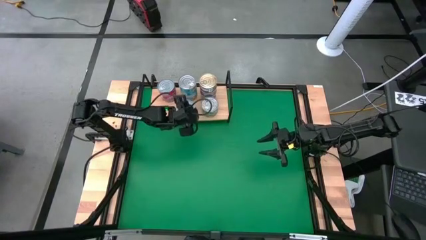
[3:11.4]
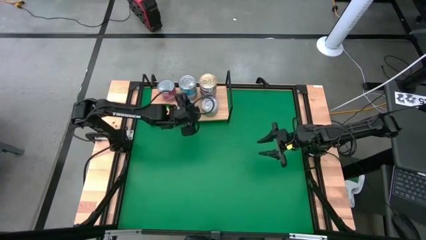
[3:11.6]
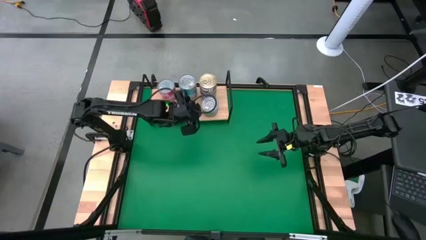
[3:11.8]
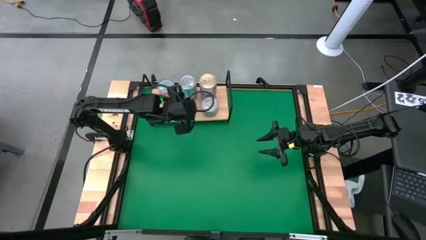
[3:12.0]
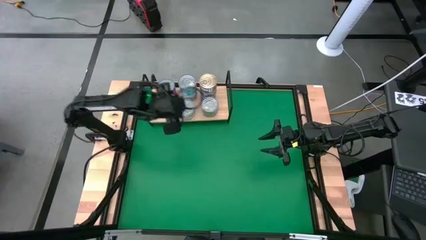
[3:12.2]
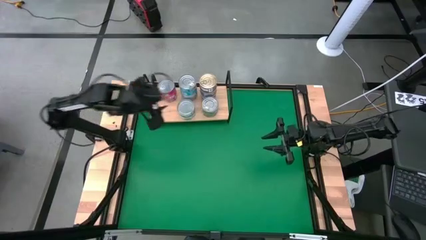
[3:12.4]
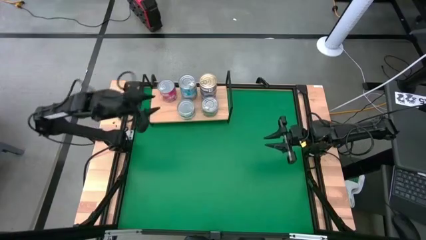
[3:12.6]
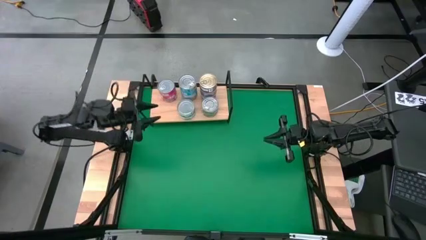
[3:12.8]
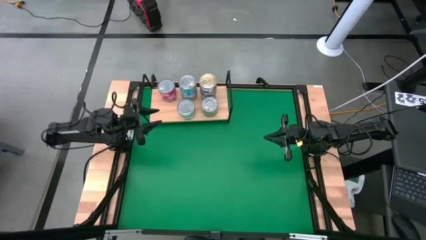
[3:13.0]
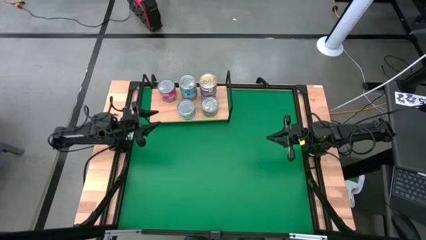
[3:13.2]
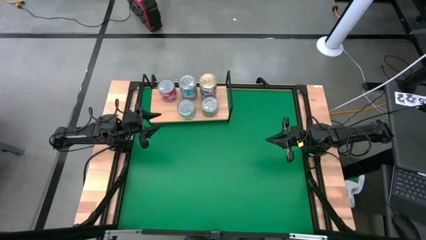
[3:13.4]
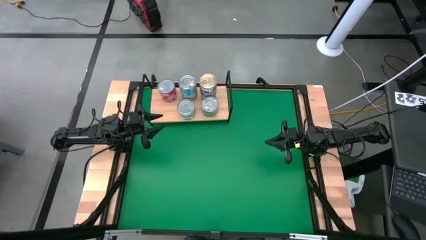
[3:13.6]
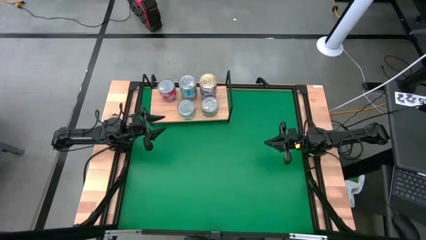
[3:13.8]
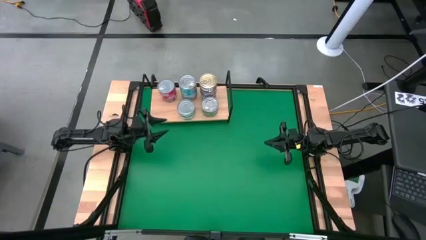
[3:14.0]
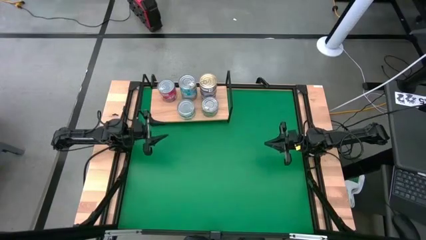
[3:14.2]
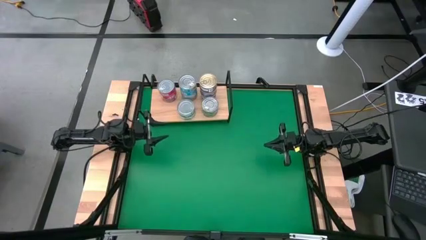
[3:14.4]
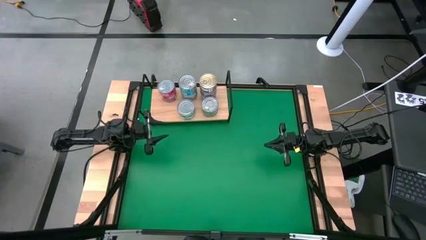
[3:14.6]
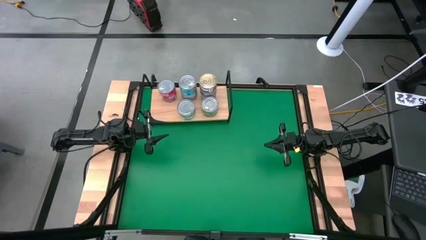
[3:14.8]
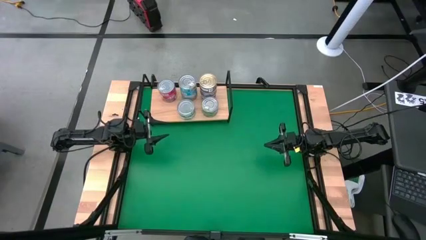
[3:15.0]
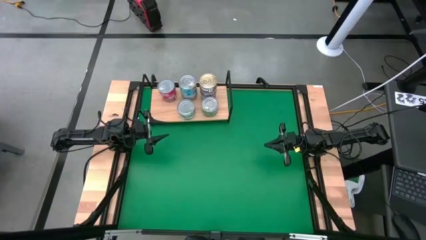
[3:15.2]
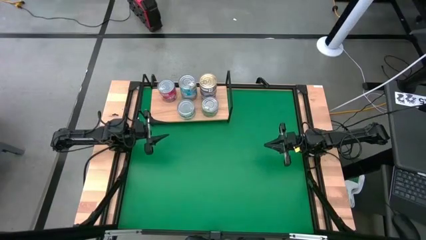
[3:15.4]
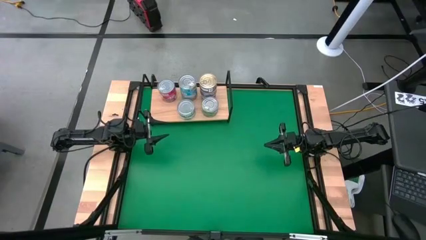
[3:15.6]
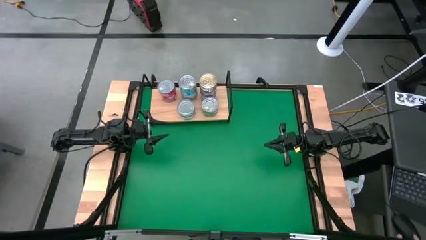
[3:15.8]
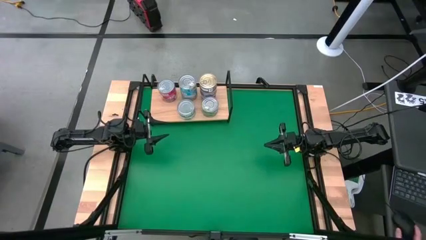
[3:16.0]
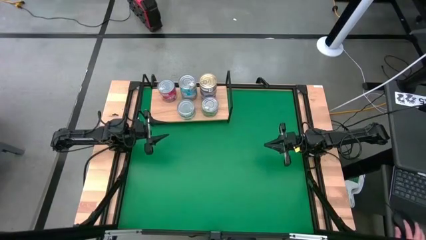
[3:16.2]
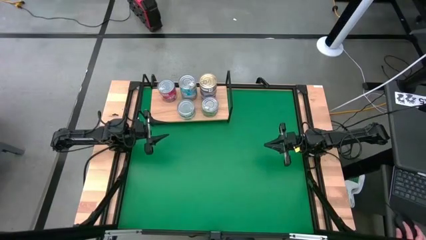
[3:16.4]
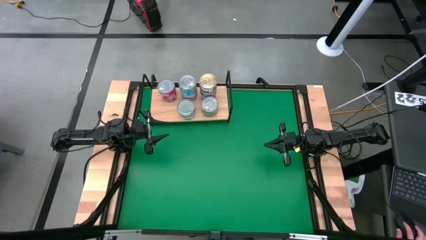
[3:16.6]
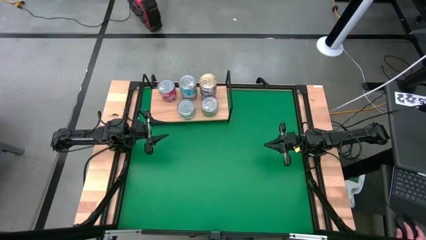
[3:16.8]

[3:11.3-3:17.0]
Task: Stack canned seafood by type on shelf
Return to Home Position

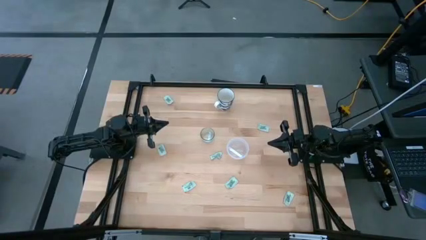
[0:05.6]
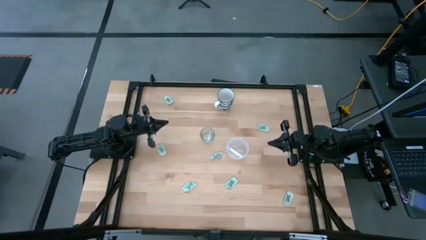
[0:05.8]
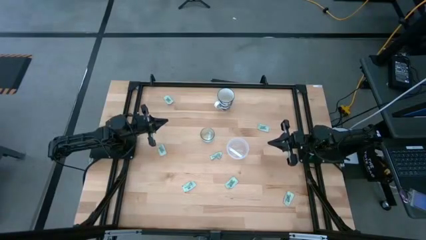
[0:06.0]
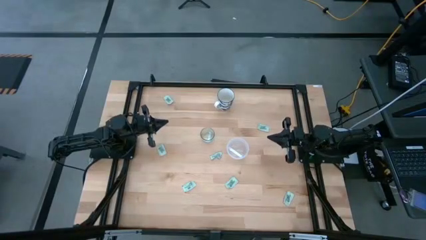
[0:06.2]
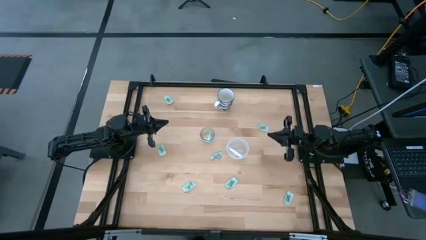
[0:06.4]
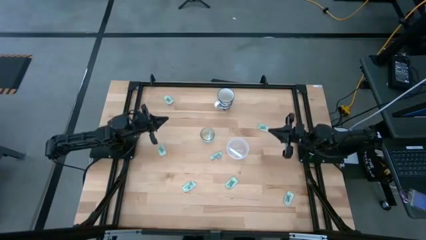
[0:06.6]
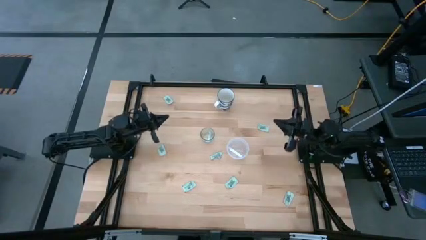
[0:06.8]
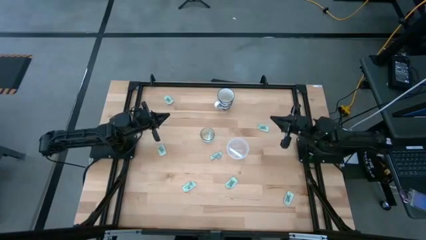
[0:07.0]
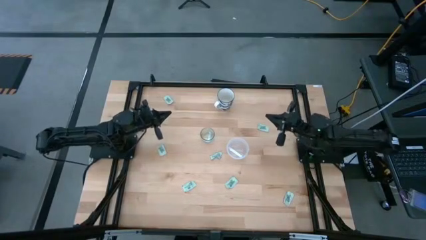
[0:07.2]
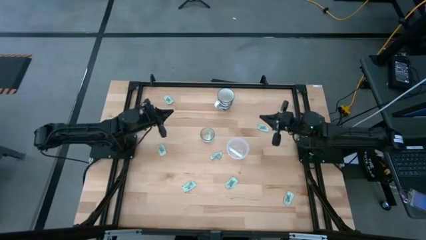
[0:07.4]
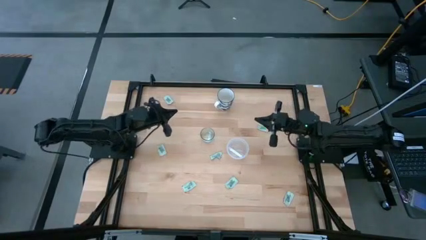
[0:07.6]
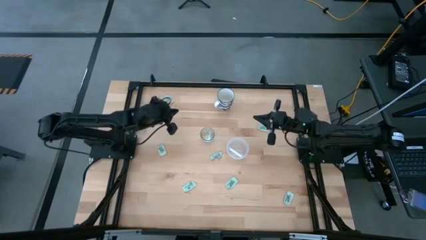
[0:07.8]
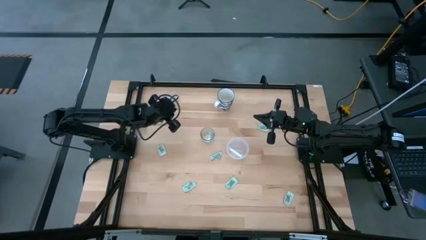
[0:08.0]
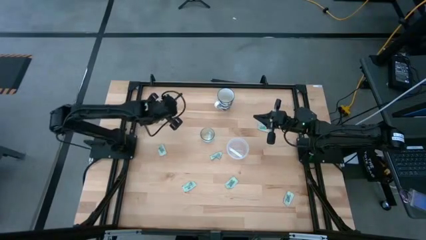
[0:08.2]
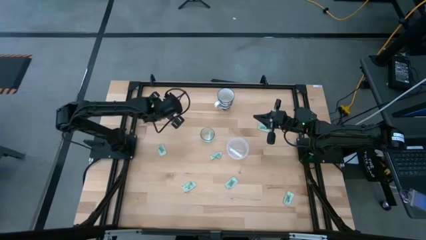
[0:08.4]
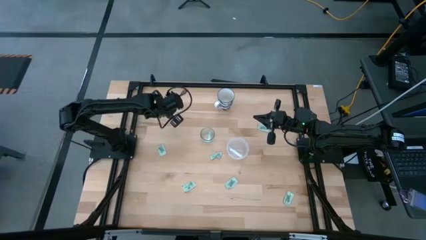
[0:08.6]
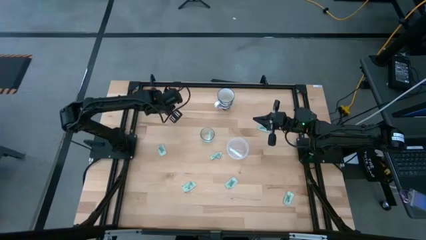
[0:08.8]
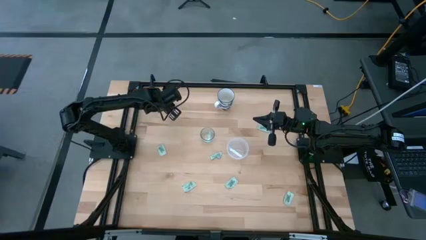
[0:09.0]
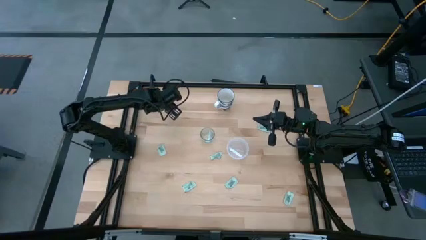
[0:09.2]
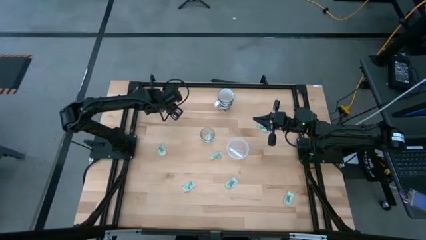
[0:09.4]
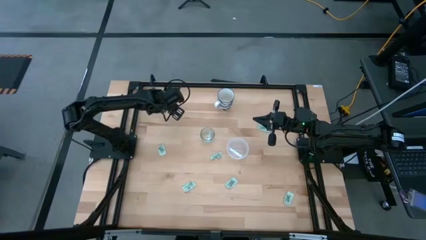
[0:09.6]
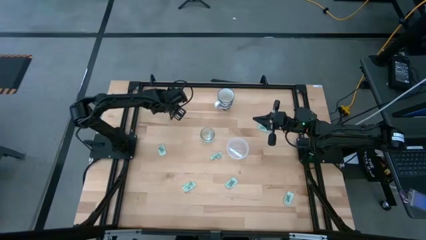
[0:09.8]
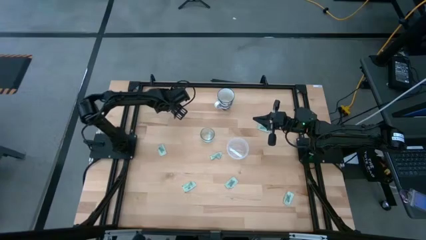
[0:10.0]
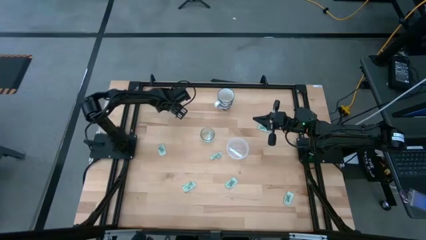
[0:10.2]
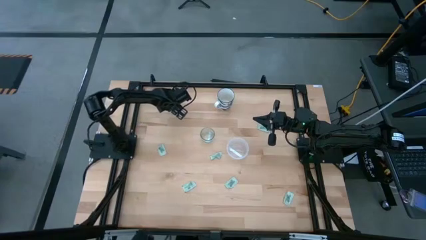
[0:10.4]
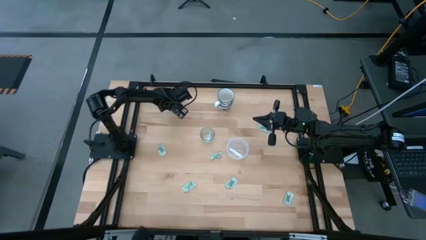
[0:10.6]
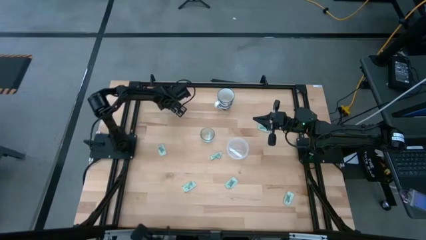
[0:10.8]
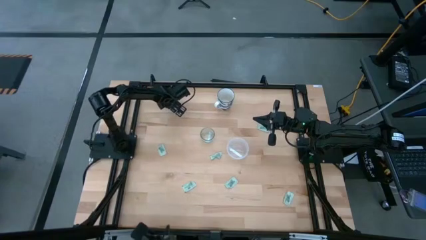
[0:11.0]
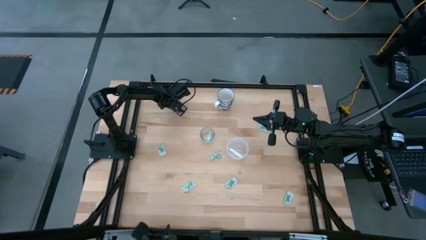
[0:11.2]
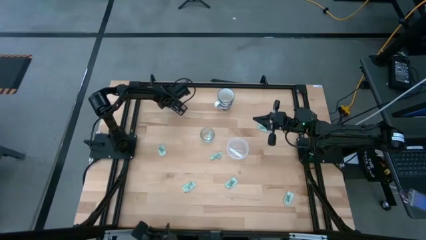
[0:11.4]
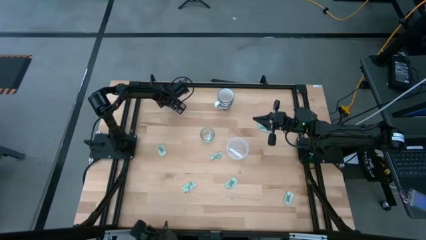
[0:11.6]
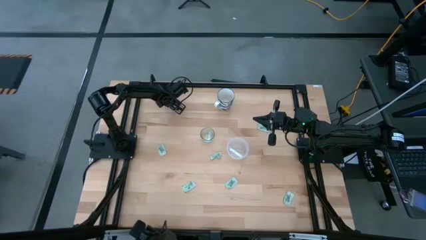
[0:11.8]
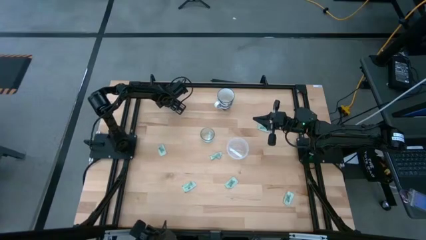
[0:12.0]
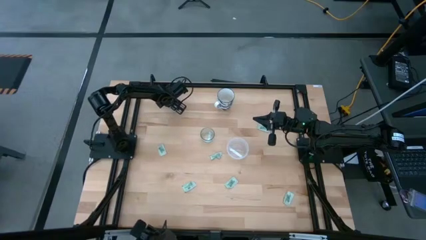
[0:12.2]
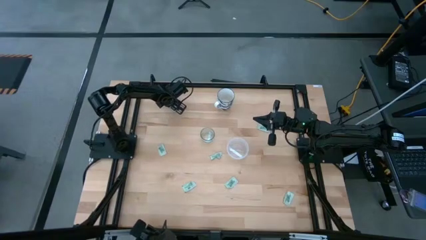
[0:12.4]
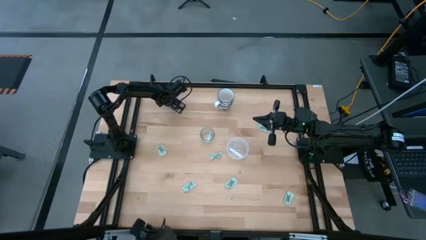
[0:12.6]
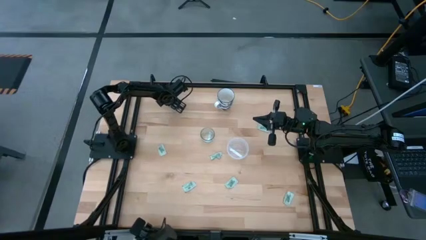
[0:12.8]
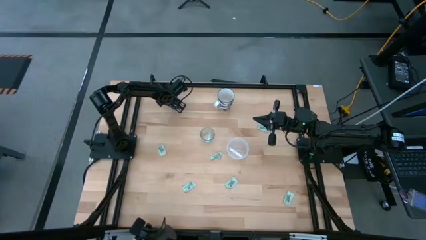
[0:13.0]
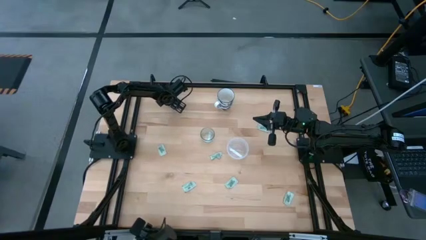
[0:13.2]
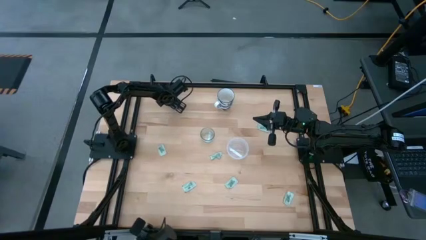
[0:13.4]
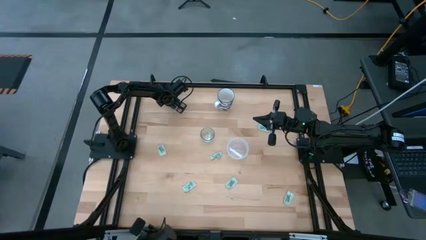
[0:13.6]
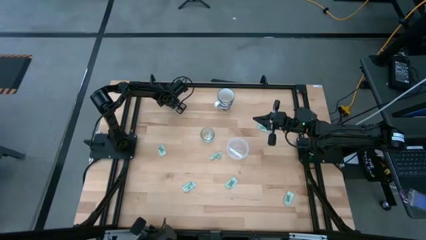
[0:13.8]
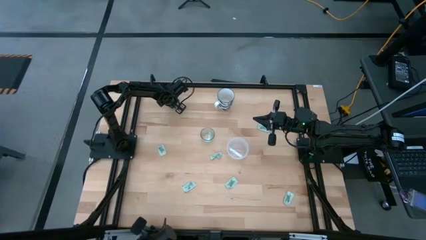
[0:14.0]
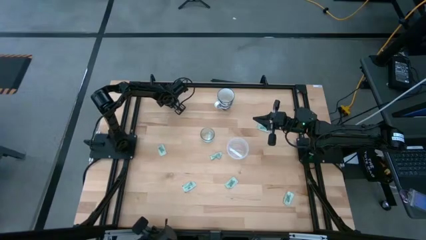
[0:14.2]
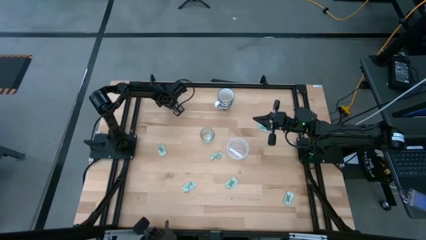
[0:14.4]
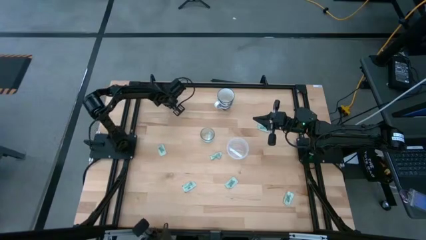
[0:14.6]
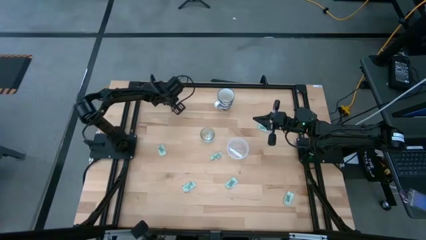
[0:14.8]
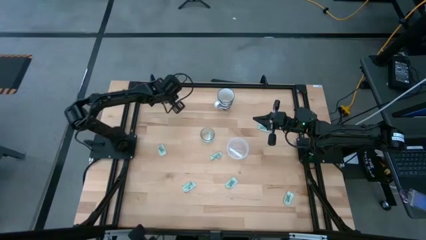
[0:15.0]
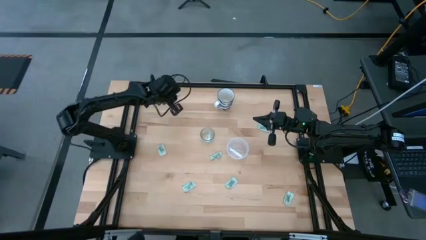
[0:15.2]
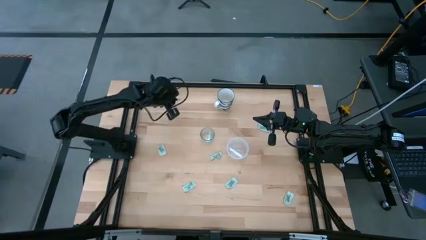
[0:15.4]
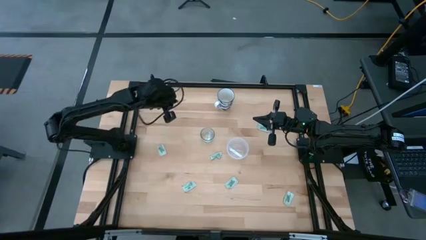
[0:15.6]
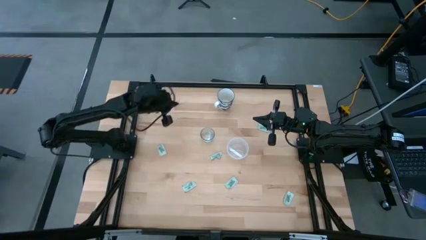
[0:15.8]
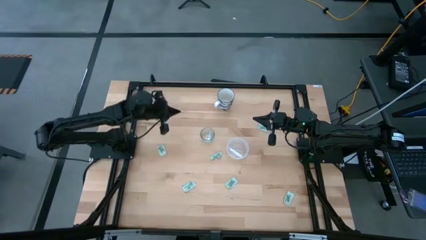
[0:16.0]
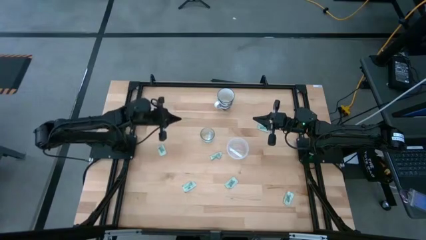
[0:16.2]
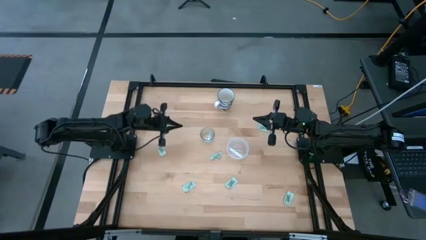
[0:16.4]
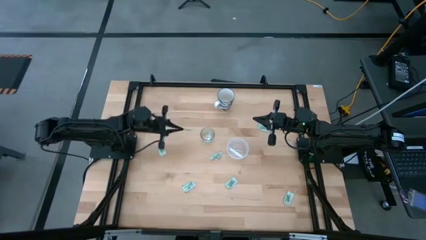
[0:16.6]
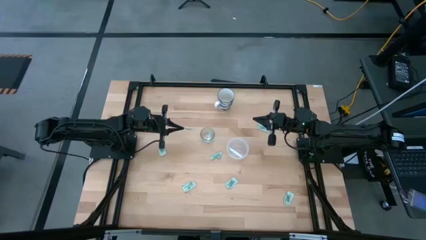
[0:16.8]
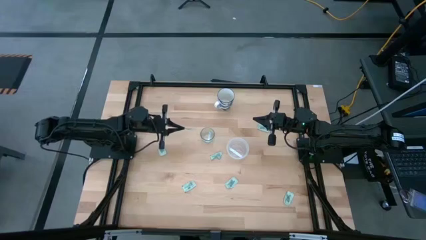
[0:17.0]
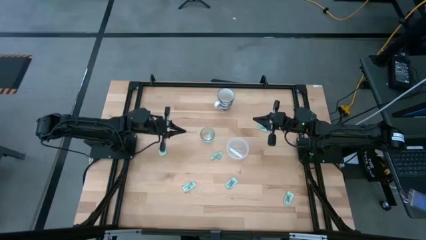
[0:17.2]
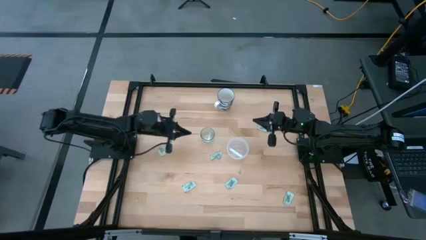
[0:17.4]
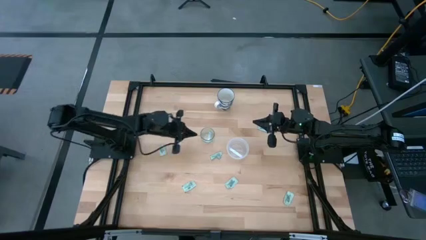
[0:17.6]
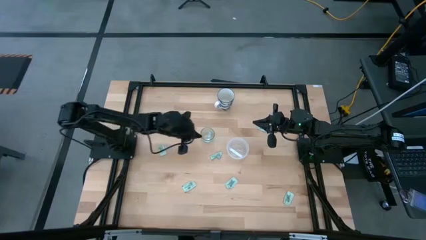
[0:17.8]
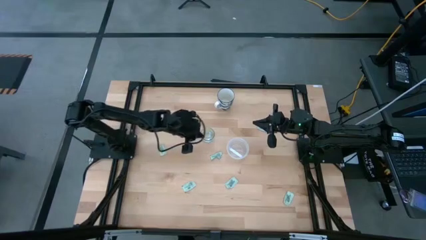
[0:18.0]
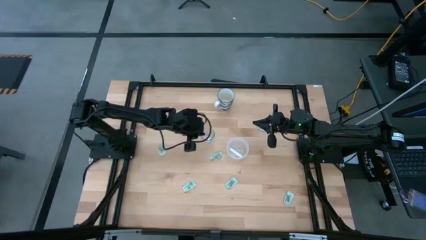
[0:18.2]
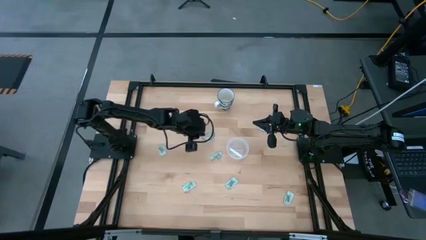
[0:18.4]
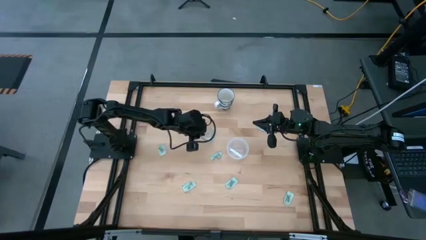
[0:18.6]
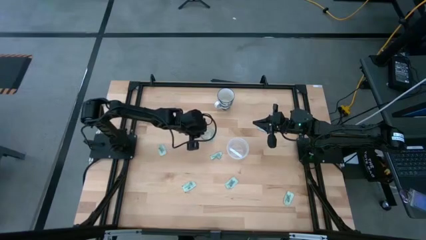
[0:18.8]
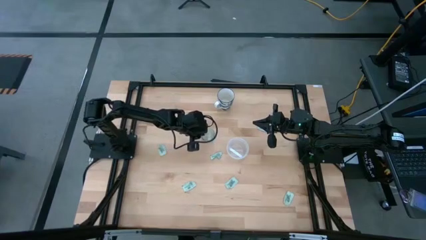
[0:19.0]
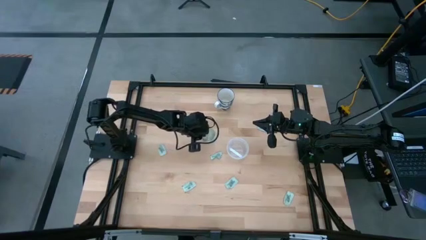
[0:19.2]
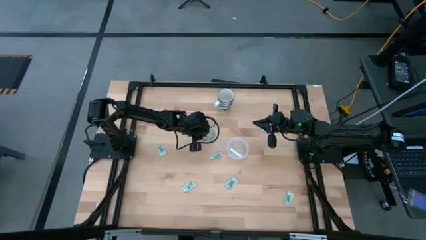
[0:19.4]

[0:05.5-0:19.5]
Task: Pick and place Stevia / Truvia into bins
Put the stevia packet into the glass container
